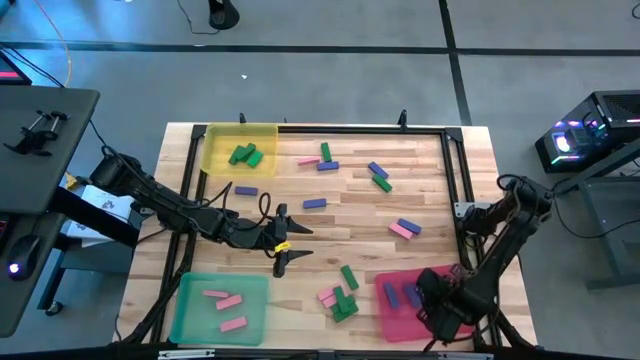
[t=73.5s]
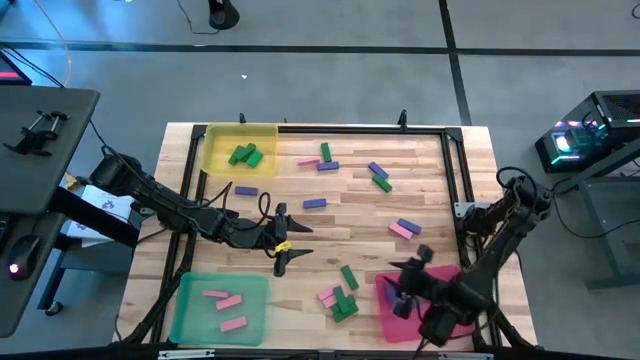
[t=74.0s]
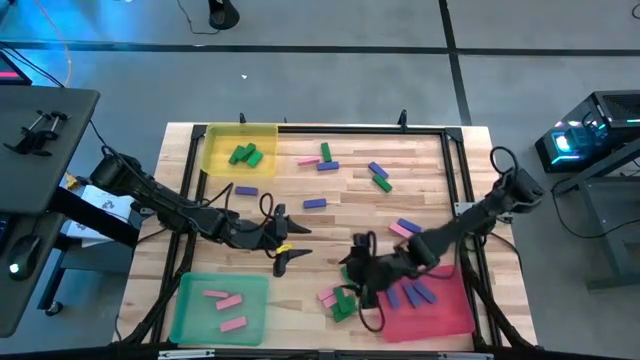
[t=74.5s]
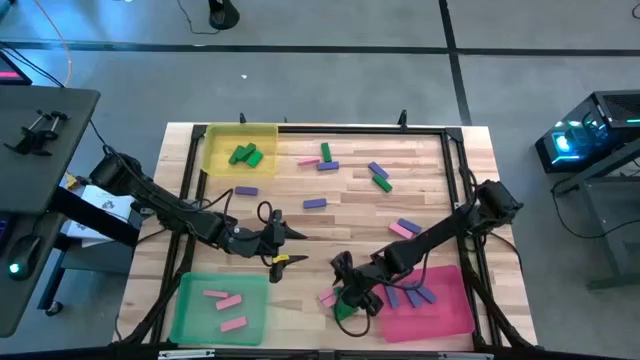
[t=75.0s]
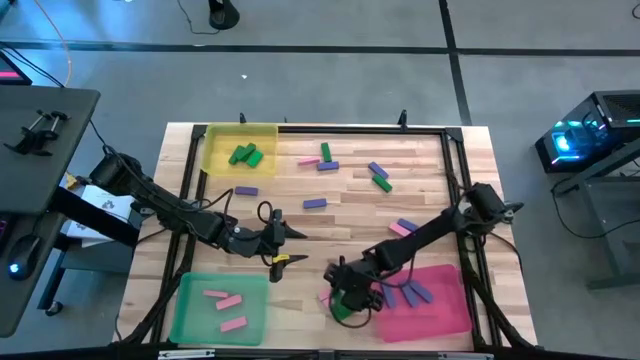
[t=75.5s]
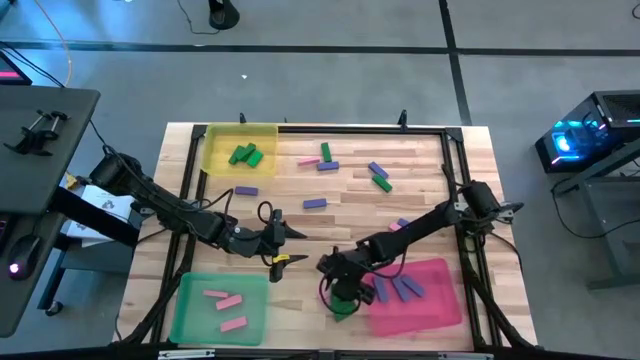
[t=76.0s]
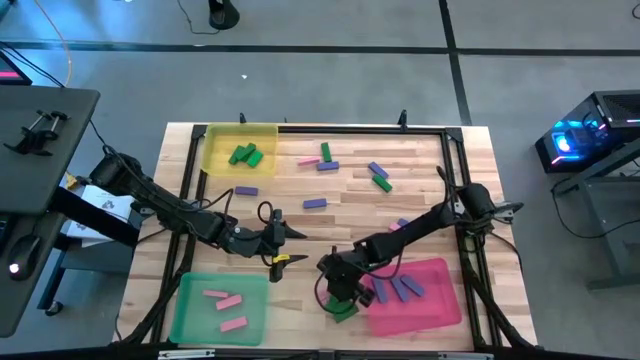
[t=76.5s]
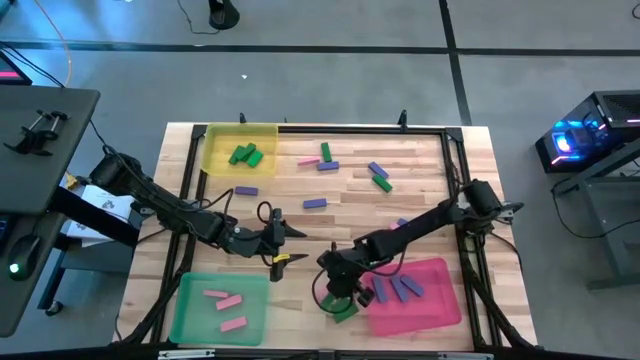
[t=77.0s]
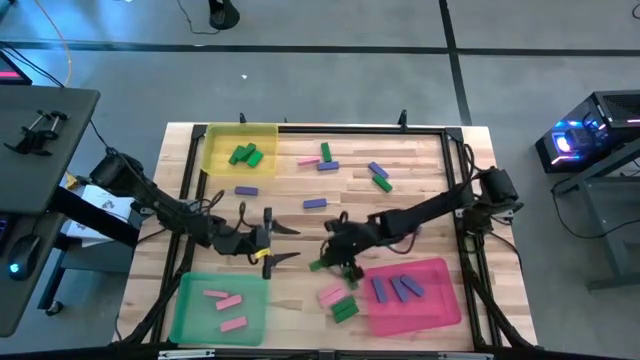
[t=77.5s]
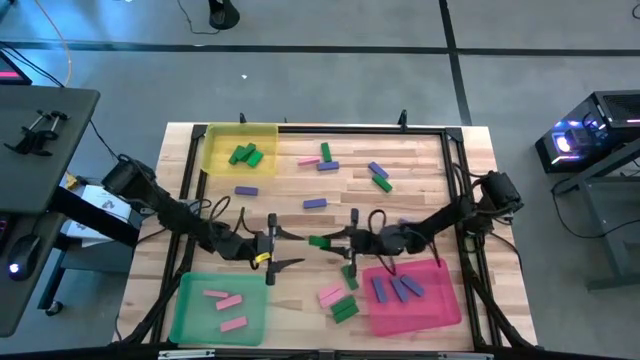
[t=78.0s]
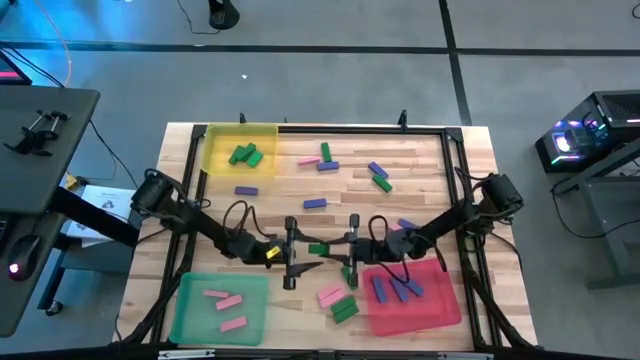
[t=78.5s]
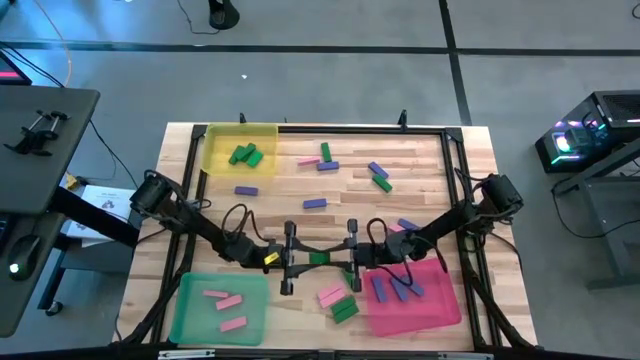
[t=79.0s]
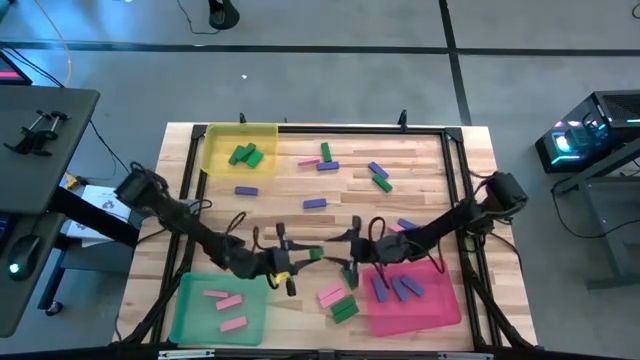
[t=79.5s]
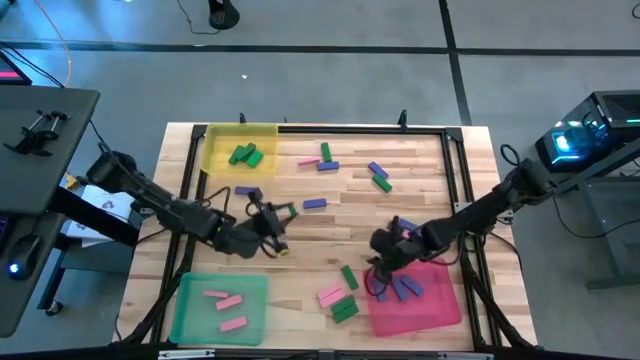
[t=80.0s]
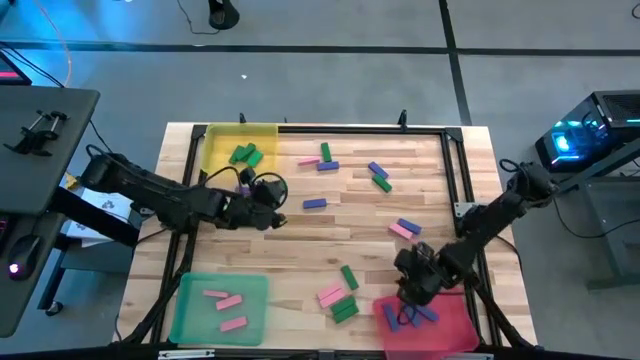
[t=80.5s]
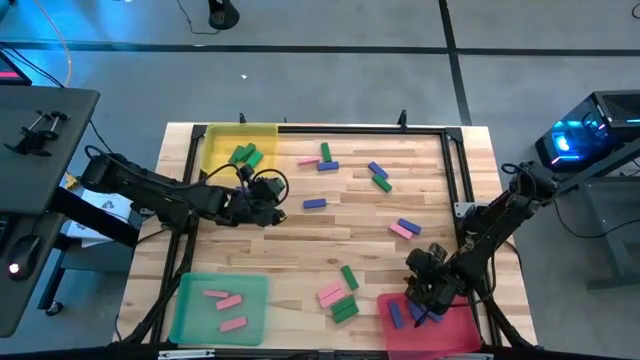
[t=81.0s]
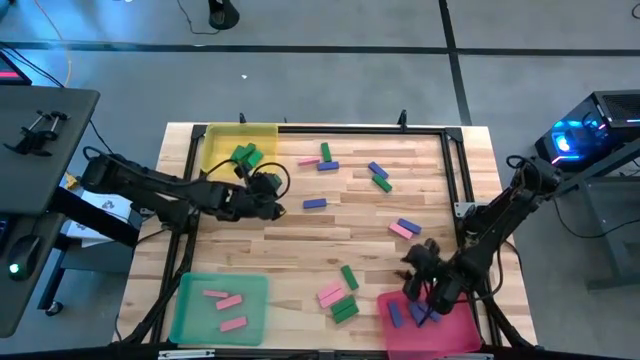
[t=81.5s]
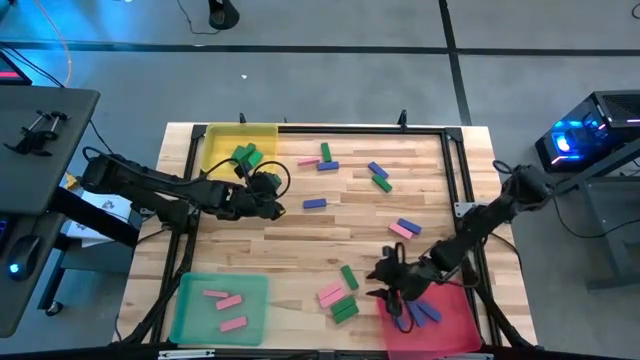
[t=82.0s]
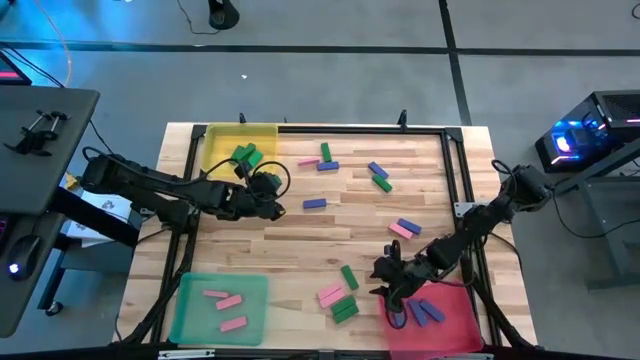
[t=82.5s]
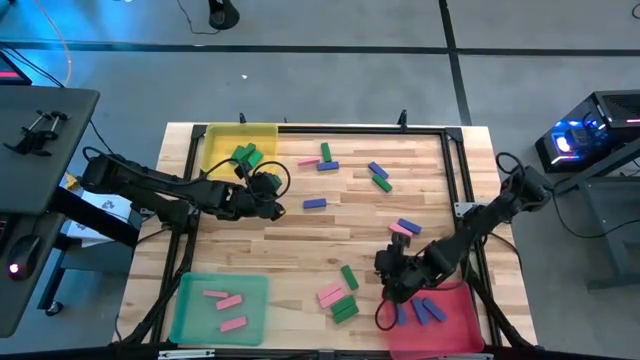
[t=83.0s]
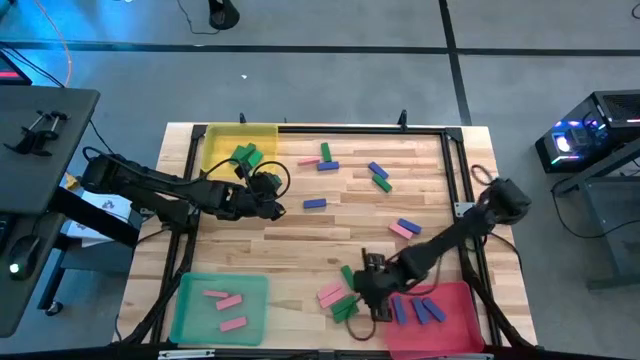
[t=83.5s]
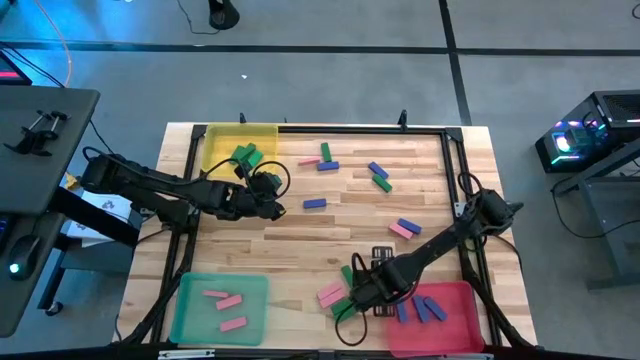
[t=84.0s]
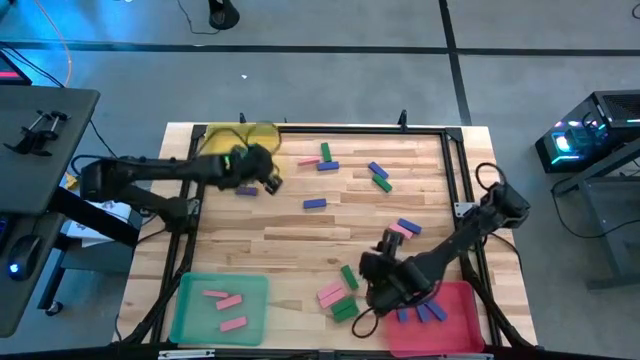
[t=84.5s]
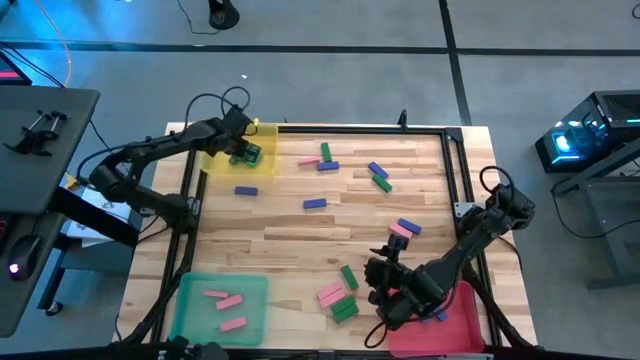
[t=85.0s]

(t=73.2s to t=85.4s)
Task: Sort blocks
Put the green block into the yellow bin

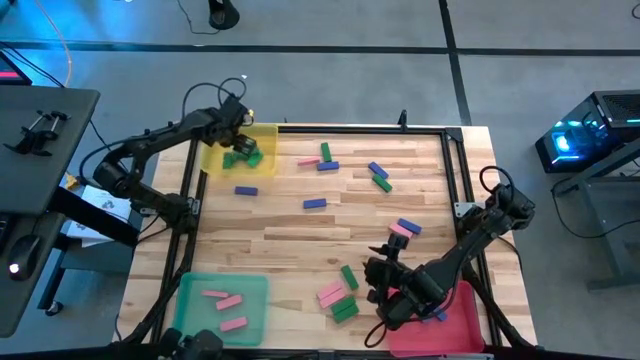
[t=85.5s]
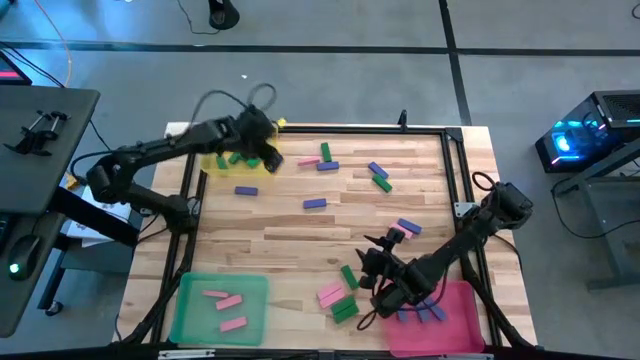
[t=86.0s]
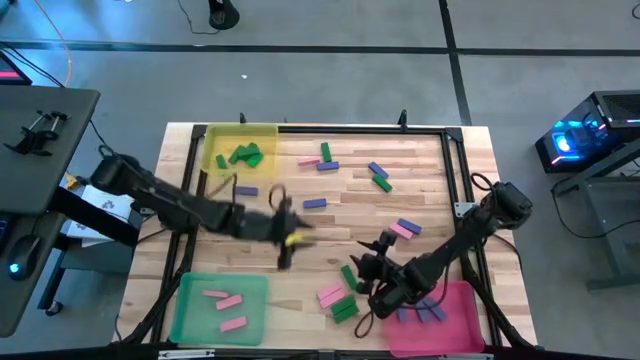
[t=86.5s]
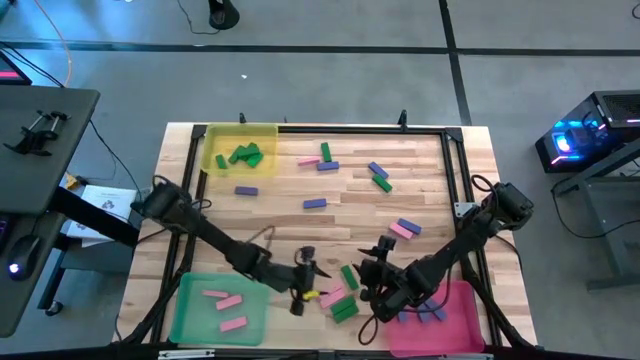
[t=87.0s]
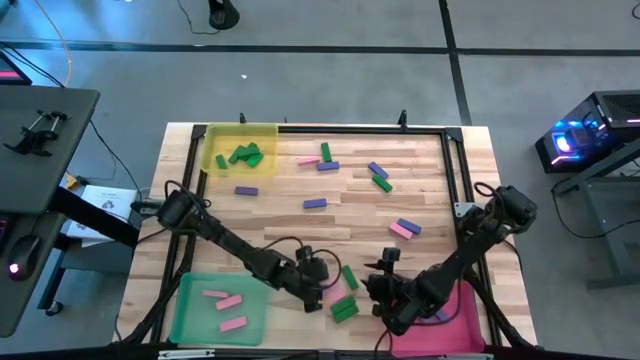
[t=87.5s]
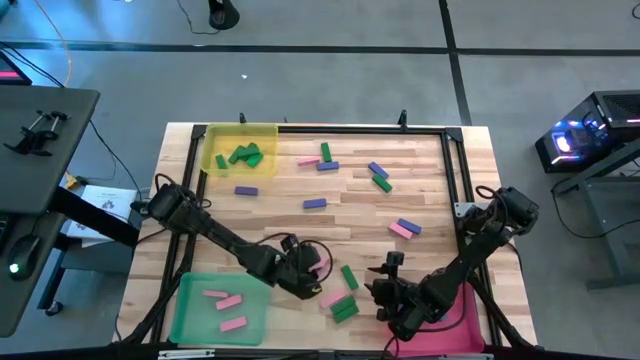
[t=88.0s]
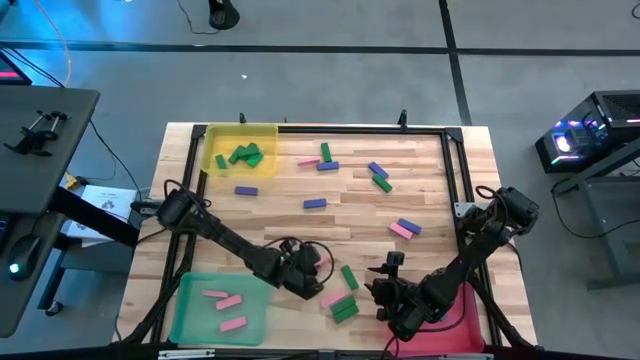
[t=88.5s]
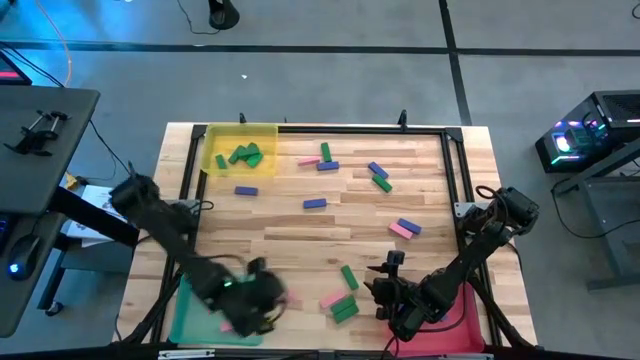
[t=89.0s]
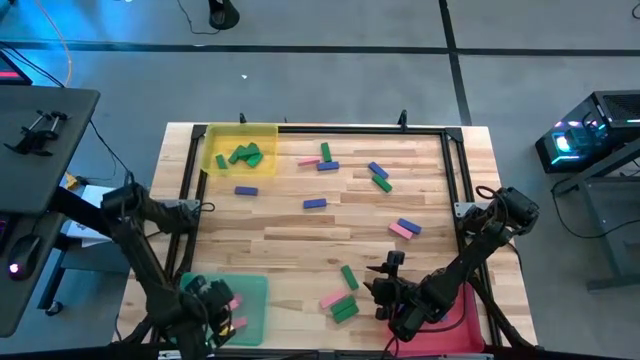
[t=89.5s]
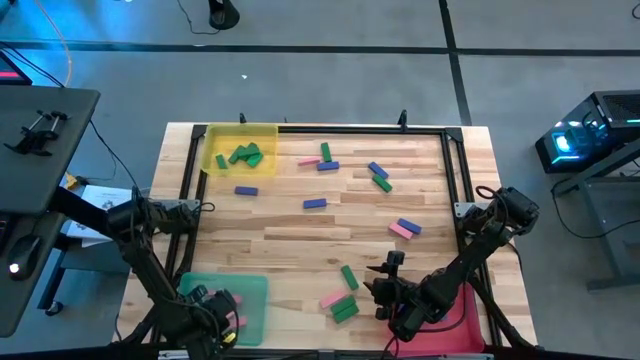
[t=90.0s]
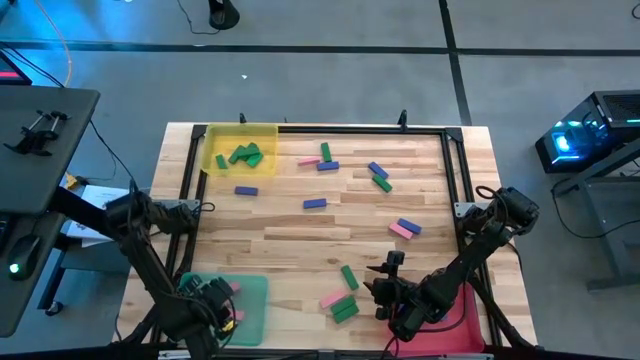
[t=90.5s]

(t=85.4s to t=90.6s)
Put the pink block into the green bin

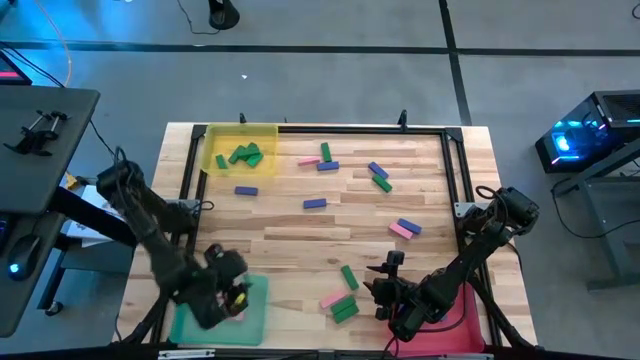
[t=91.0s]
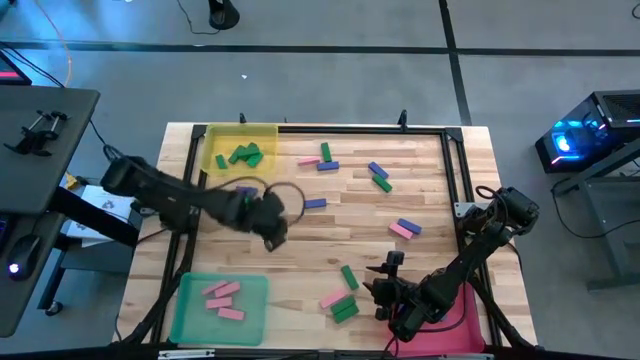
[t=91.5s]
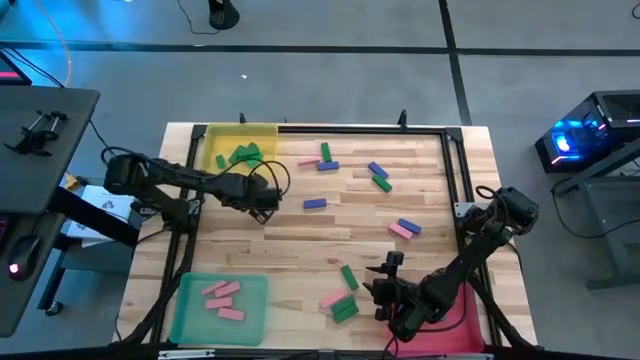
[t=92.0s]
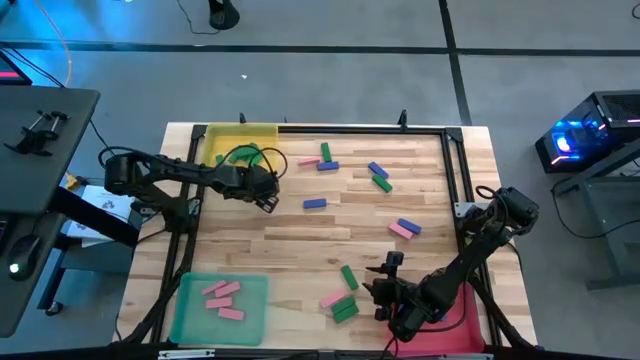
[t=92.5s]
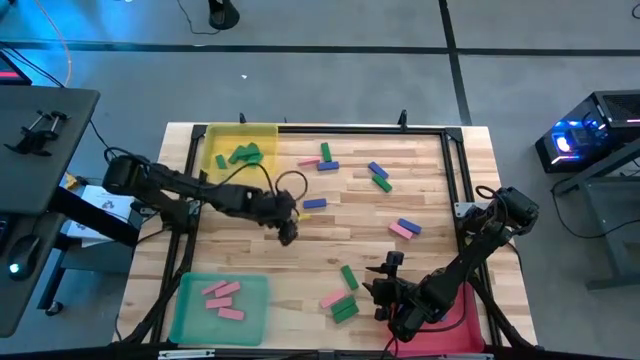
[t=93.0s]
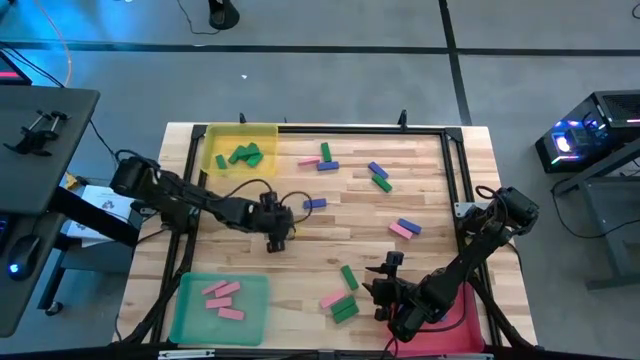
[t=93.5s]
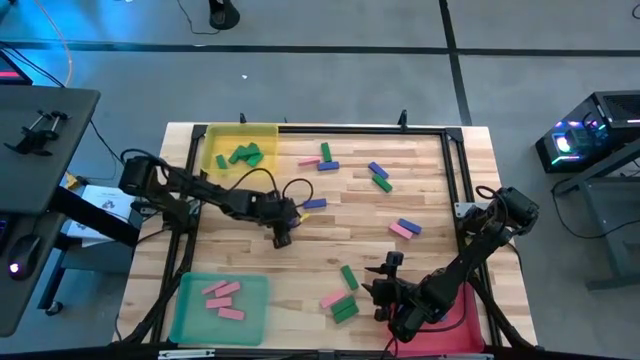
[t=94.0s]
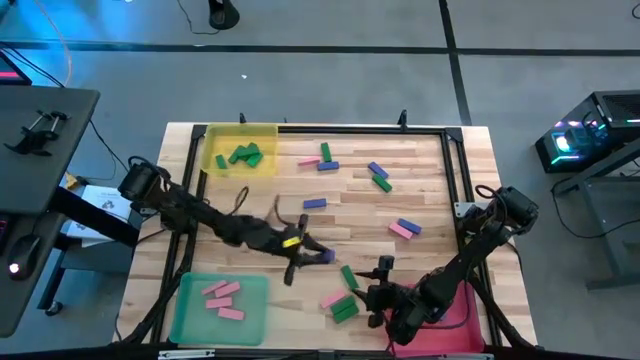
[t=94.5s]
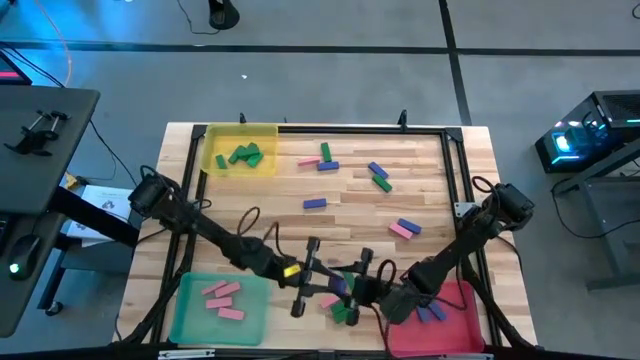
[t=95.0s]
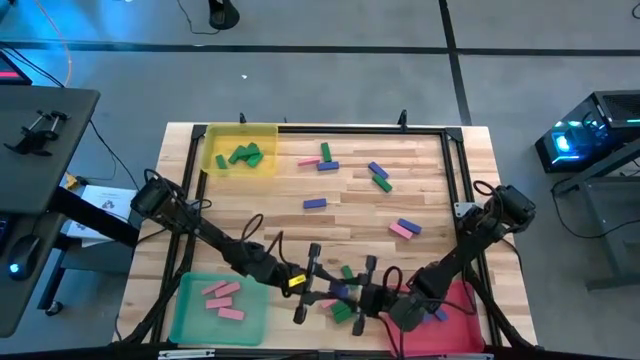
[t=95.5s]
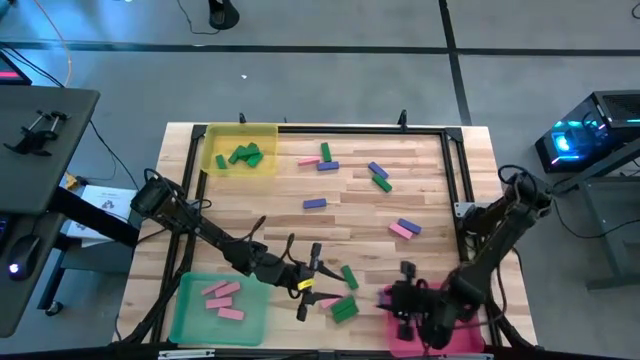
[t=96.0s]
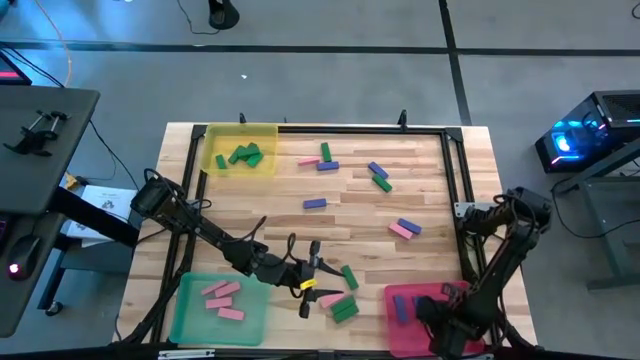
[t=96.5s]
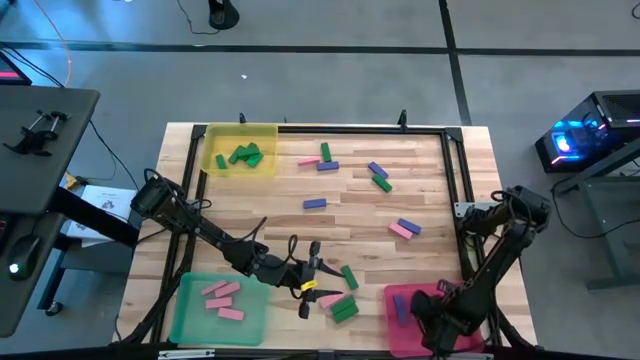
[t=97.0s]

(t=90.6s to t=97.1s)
Put the violet block into the pink bin
